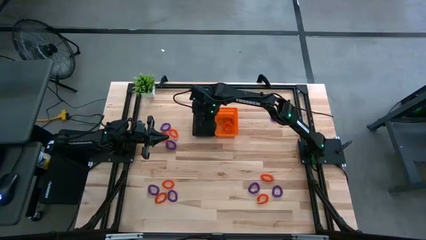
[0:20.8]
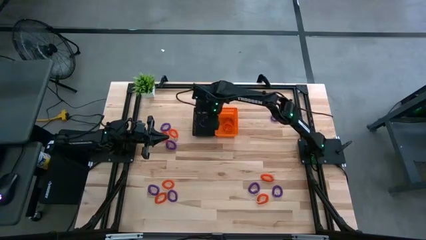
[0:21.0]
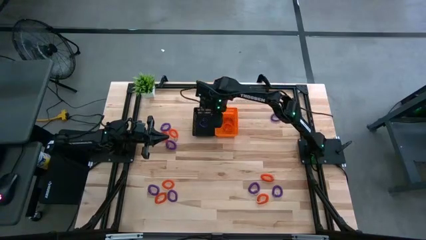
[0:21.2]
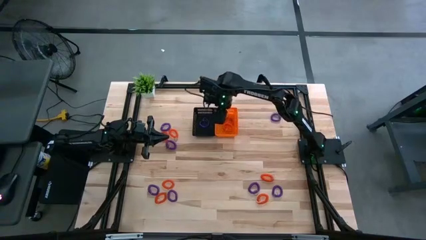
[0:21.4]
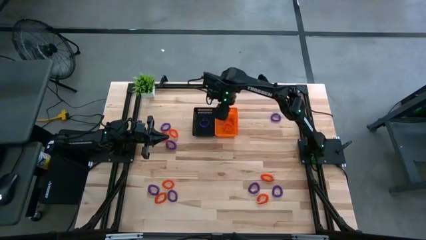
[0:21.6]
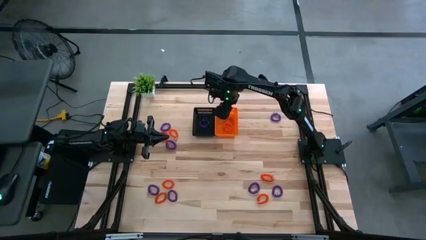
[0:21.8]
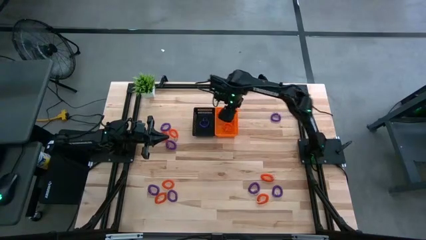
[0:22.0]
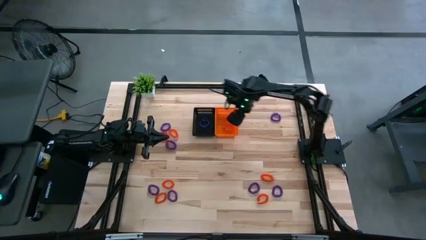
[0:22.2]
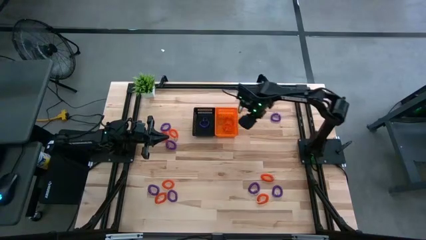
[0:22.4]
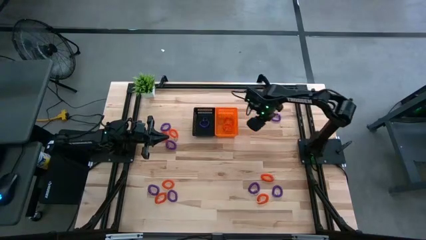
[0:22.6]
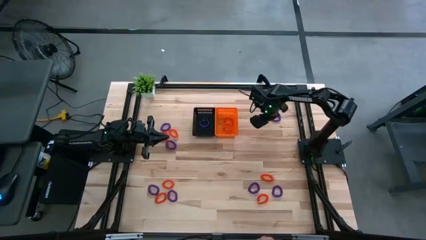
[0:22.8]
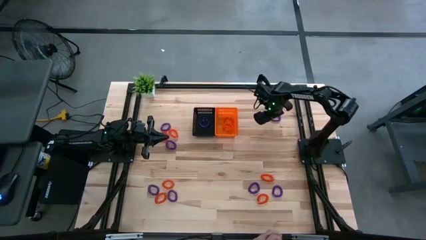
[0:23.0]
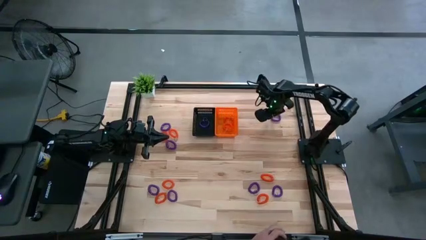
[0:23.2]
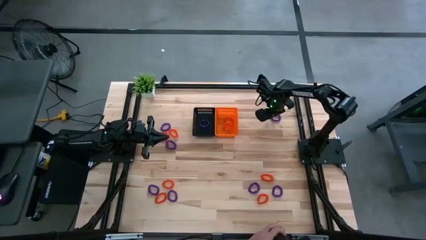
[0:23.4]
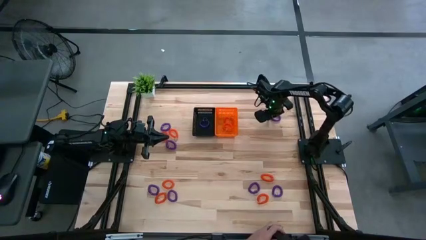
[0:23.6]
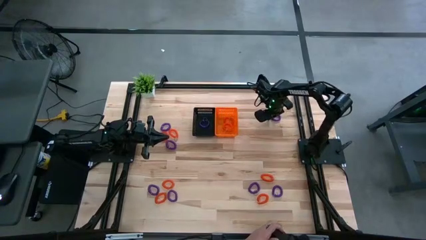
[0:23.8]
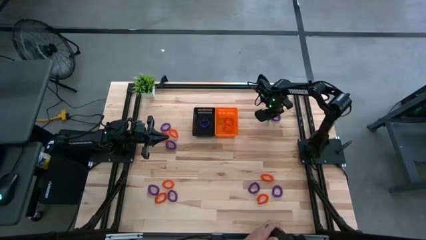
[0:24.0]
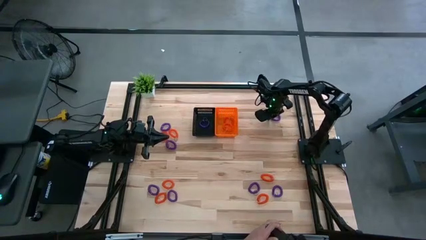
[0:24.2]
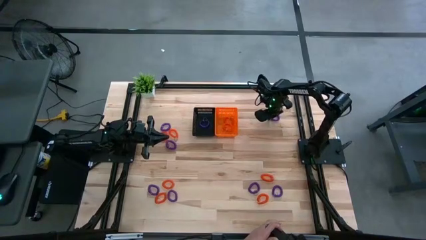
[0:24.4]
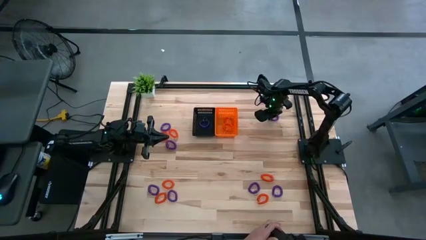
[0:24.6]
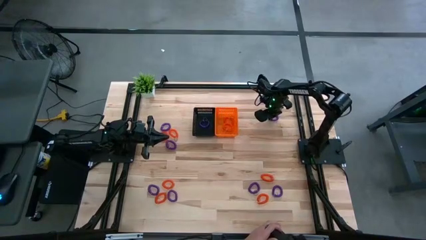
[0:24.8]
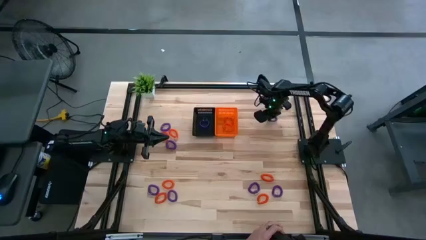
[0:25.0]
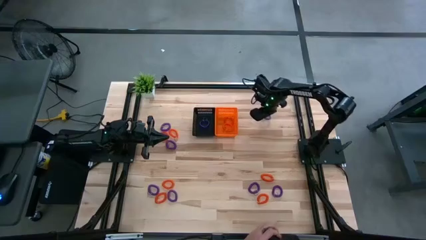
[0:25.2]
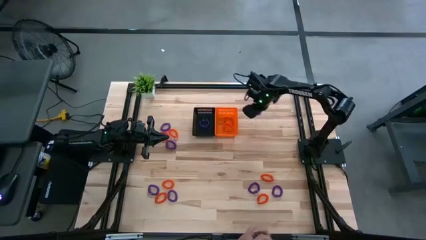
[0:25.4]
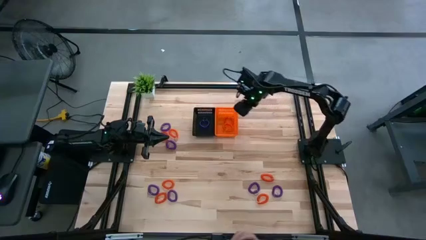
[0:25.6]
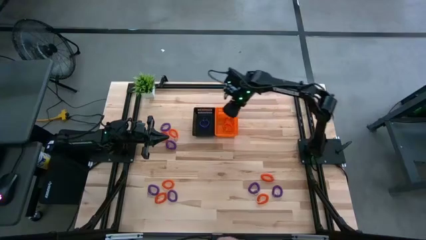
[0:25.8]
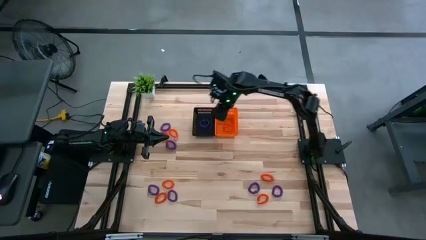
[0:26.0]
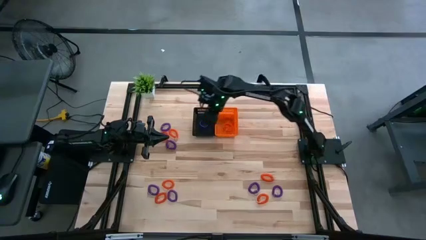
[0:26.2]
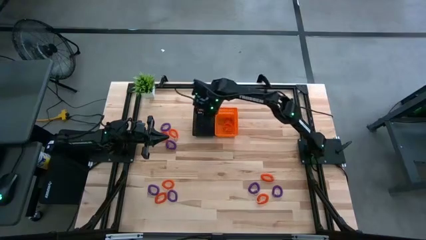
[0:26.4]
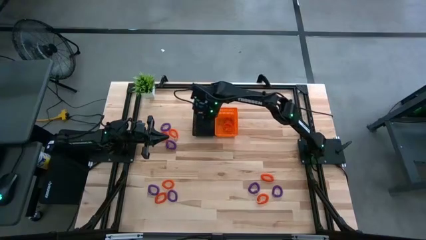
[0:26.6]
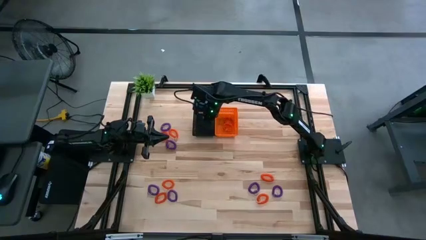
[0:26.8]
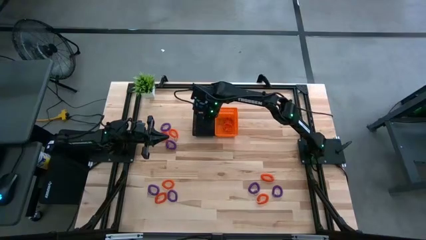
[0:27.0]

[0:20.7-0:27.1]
Task: Sort spring keychains into baskets
Put the purple spring keychain into the black basket

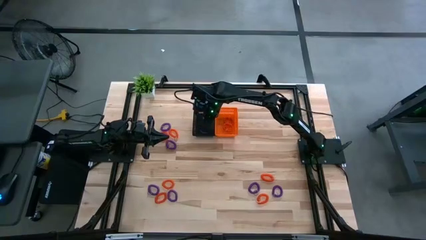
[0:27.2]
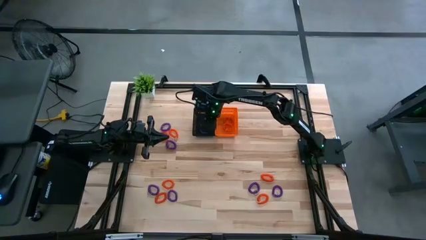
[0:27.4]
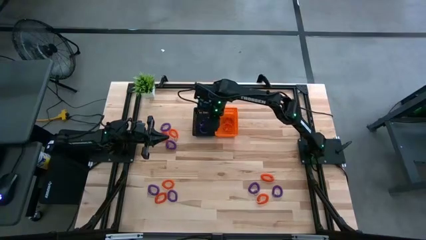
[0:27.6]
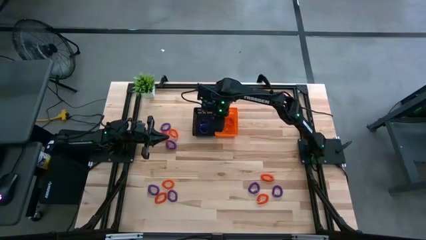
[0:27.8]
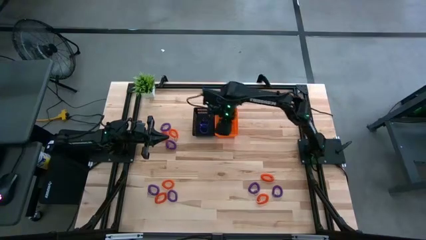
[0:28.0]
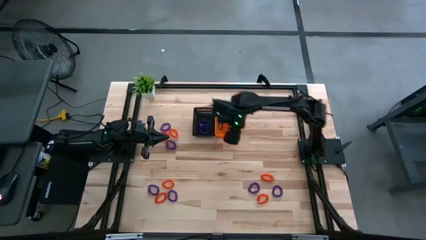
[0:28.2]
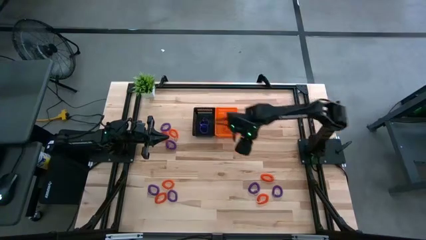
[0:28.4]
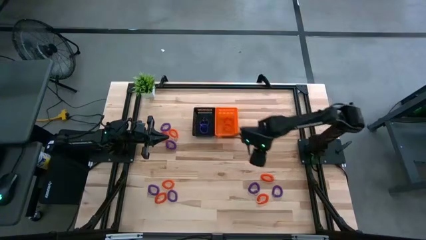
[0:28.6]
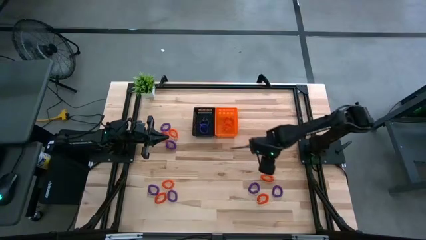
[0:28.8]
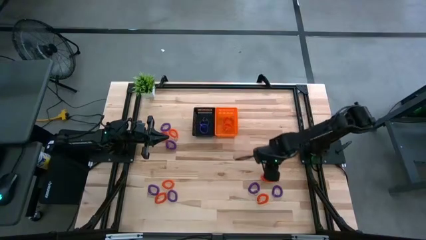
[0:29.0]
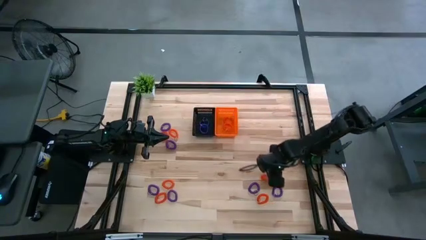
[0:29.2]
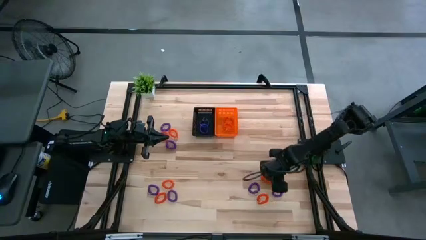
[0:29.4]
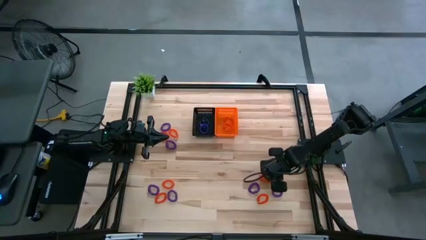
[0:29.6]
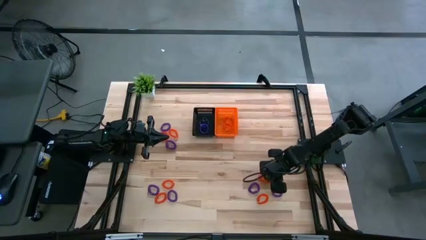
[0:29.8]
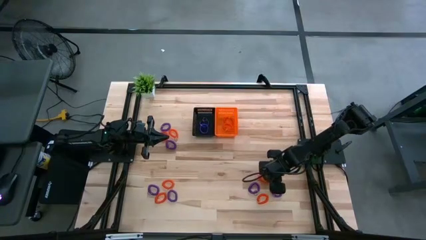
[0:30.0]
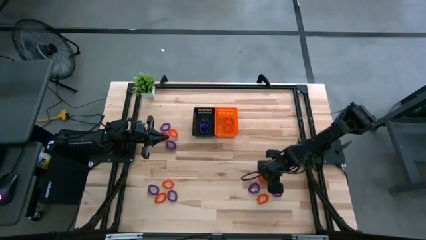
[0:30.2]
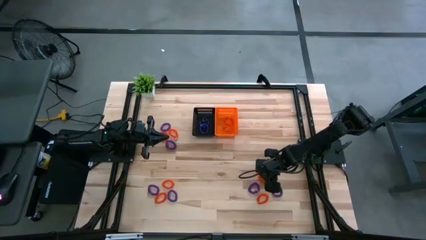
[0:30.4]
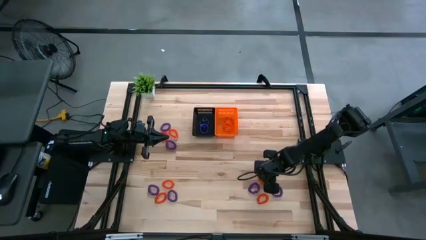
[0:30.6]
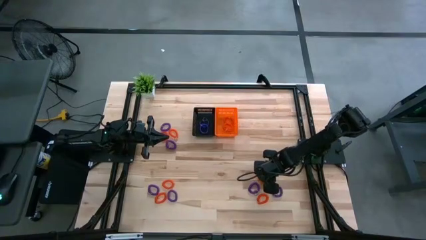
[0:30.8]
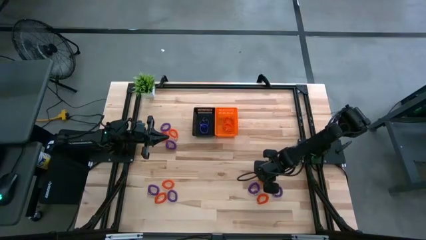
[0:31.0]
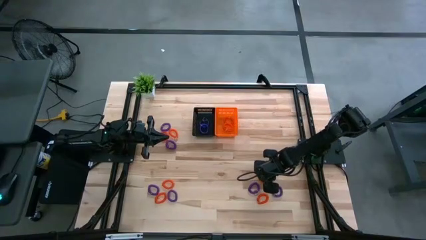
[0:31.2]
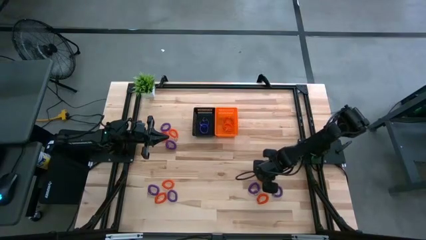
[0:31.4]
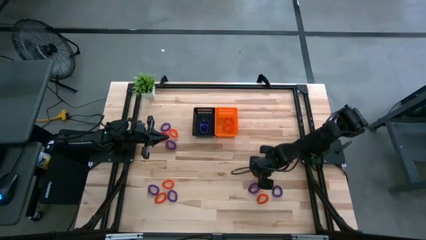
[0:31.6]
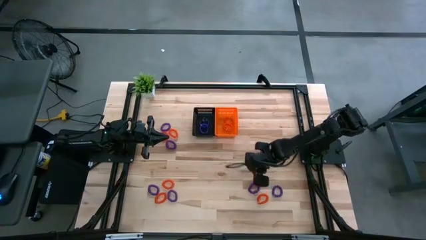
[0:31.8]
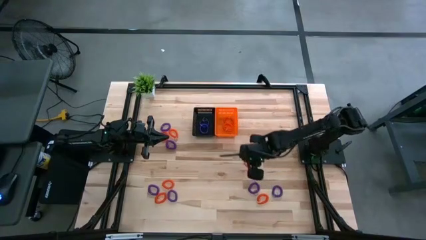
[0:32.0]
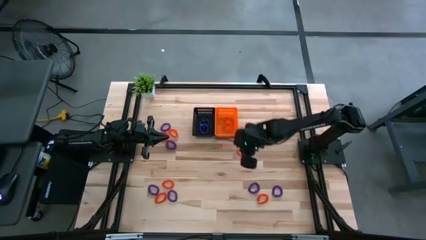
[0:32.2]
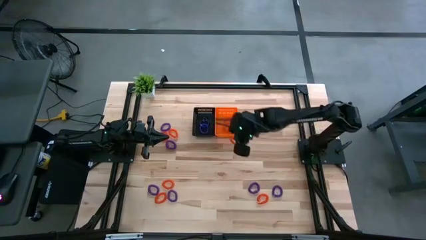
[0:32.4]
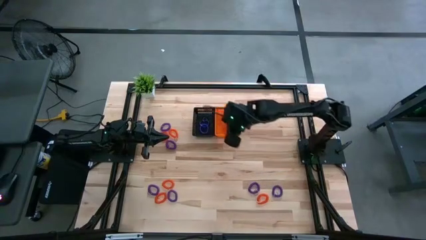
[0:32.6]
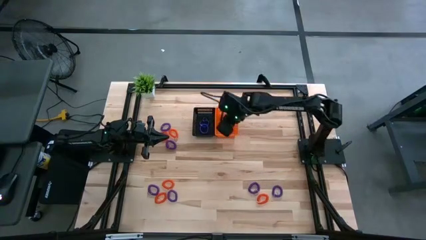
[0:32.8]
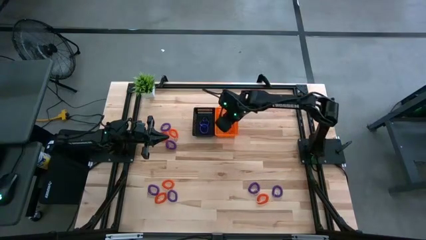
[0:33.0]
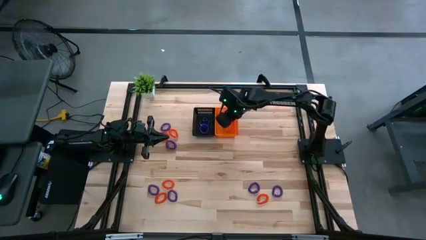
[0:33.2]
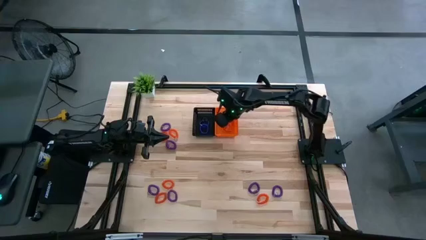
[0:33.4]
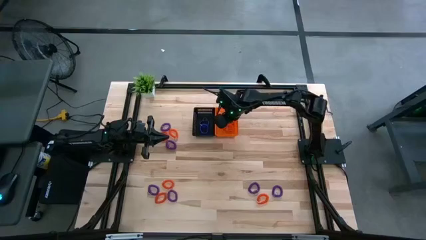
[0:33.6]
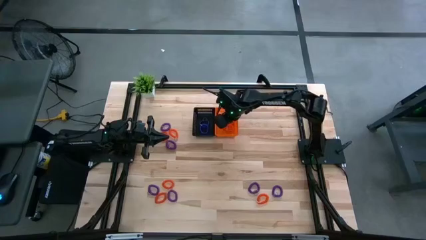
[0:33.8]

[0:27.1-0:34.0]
Put the orange spring keychain into the orange basket

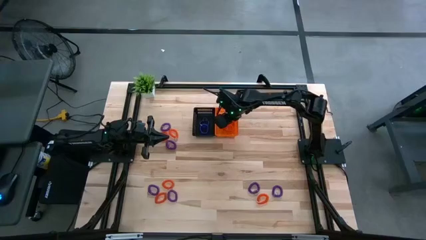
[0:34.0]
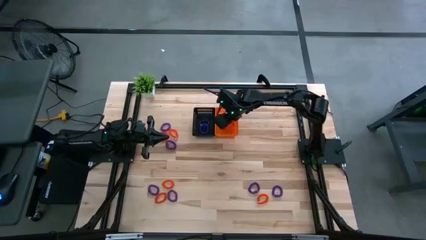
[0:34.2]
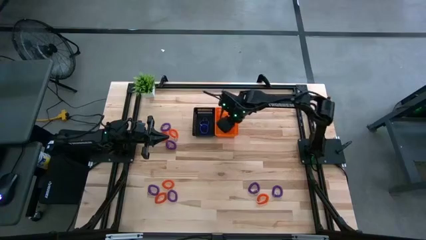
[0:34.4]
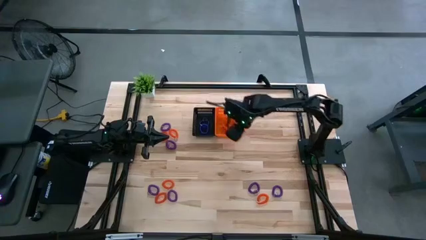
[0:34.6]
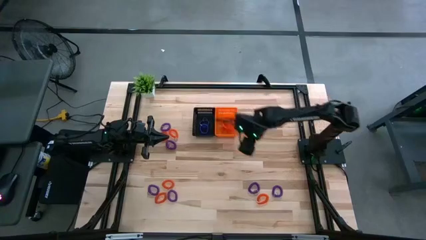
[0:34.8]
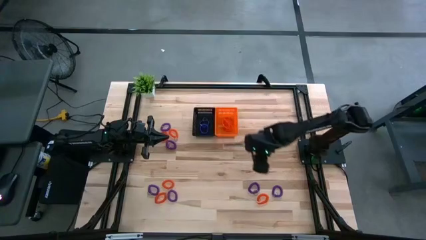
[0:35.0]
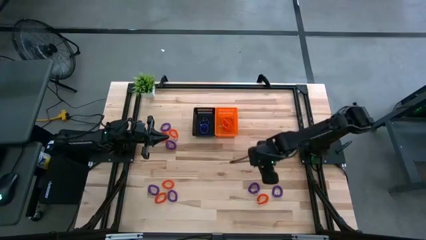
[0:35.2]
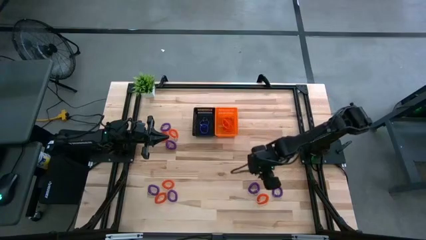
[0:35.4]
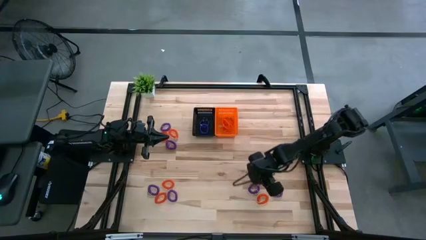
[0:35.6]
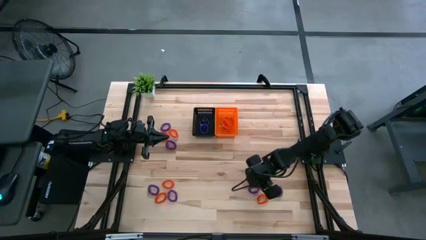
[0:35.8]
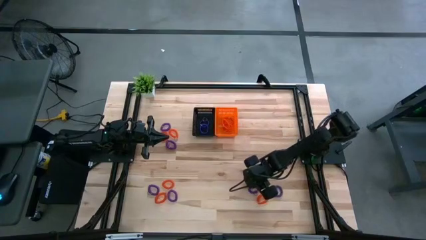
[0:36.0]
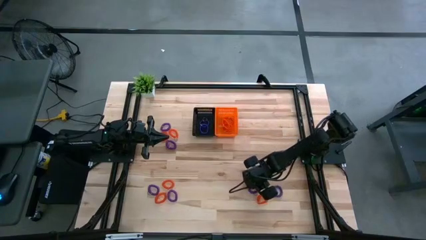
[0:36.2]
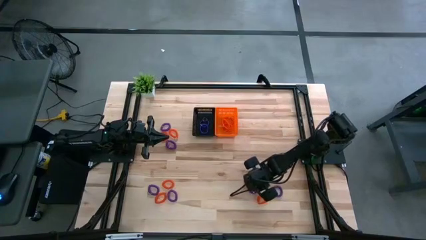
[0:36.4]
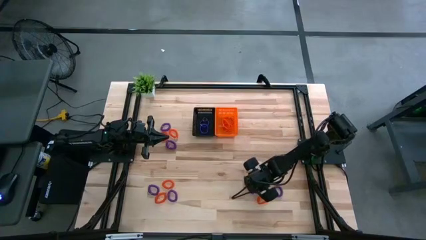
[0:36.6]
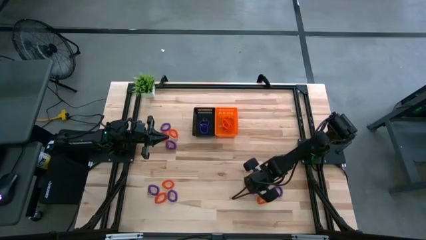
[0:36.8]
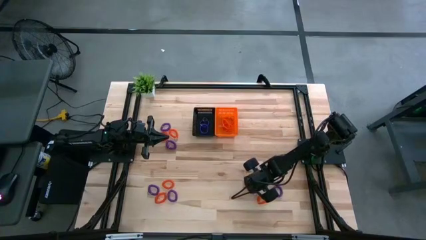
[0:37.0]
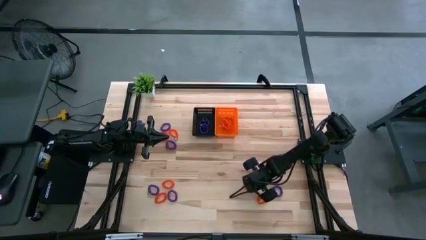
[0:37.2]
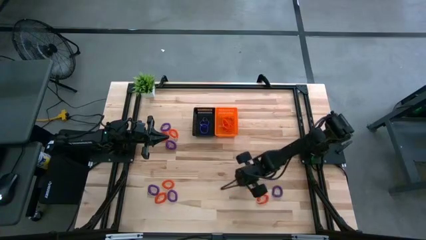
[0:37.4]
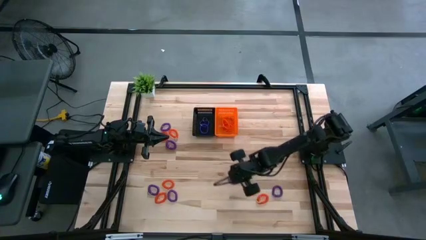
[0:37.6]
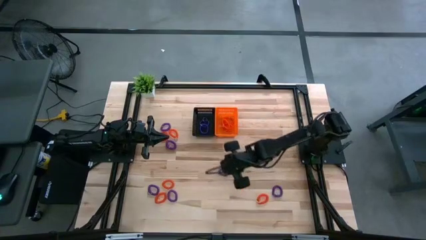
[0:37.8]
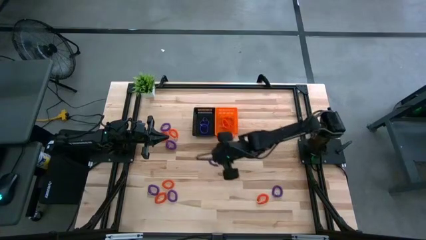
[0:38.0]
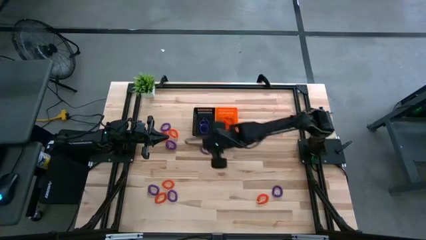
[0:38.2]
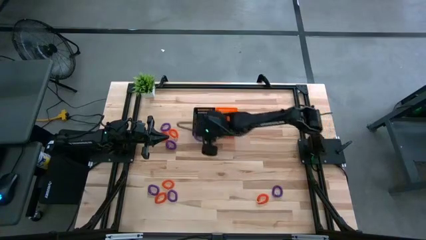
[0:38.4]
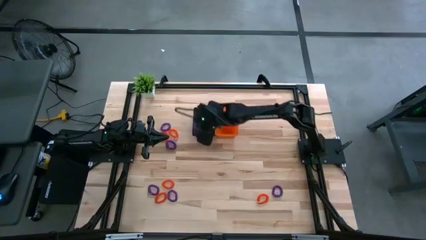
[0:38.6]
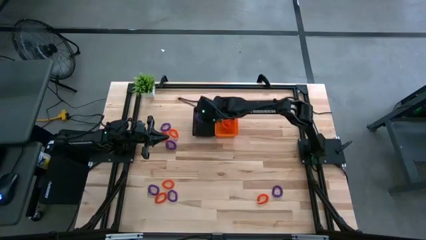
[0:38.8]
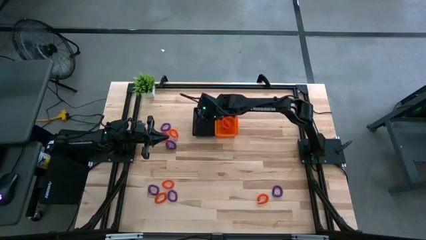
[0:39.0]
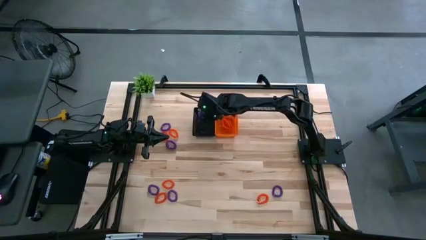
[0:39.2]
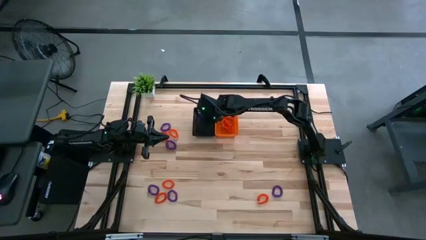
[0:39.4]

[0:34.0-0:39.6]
Put the purple spring keychain into the black basket
